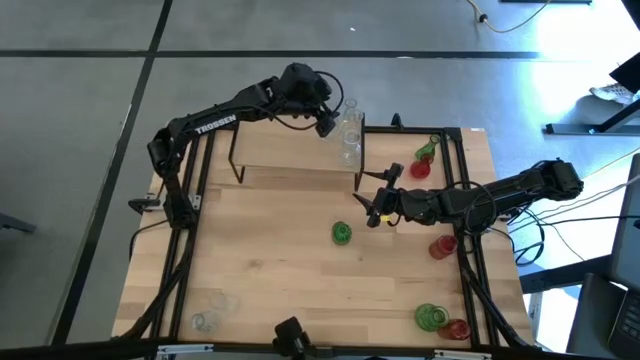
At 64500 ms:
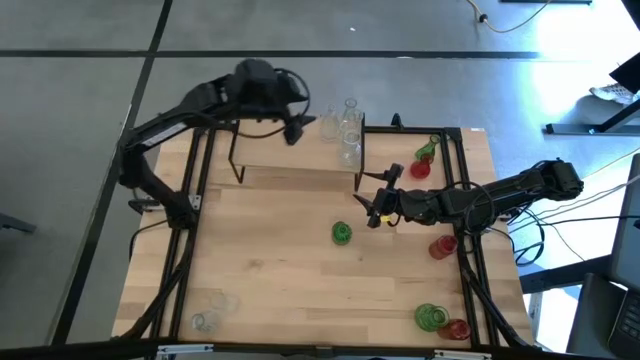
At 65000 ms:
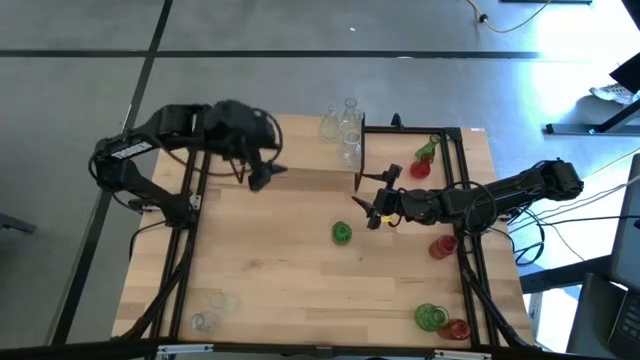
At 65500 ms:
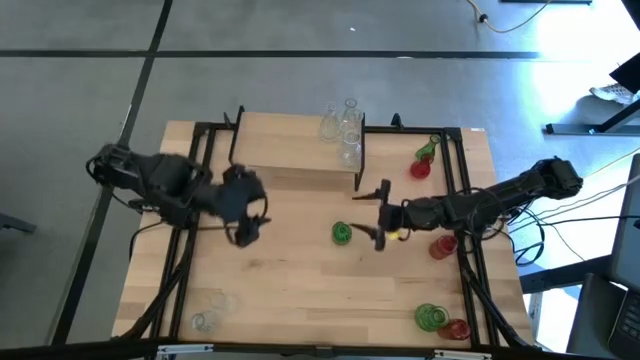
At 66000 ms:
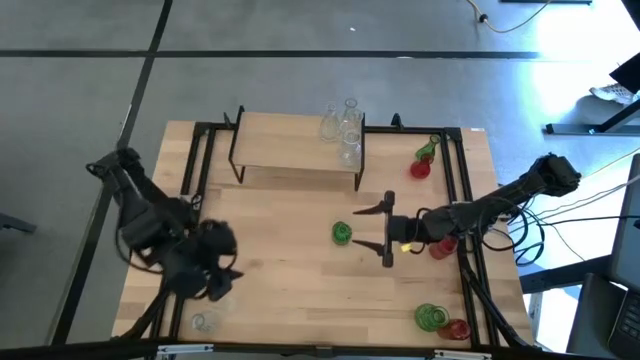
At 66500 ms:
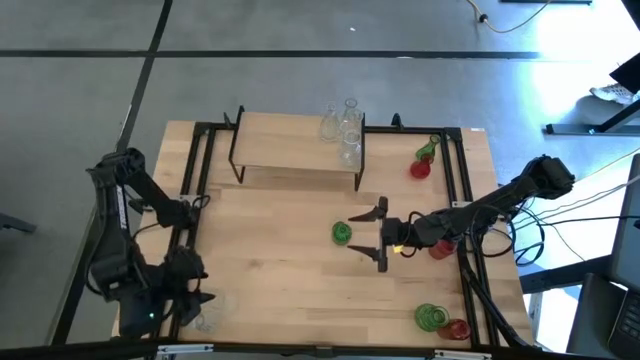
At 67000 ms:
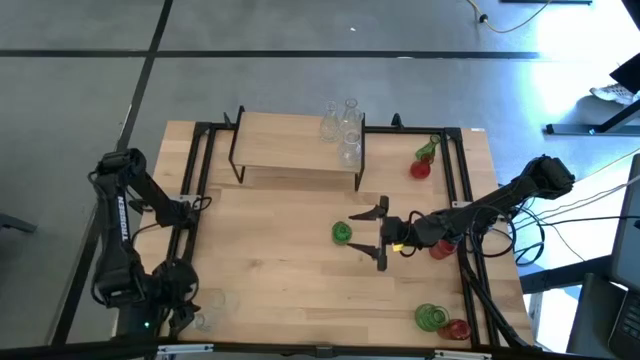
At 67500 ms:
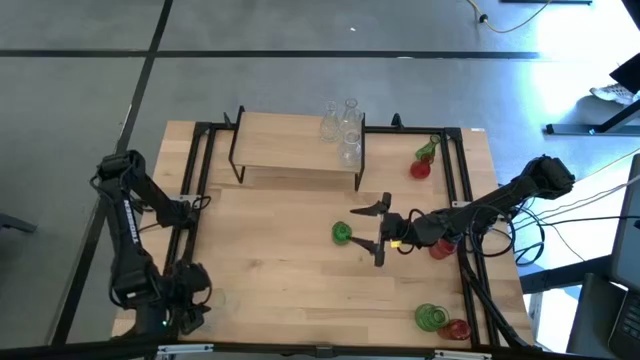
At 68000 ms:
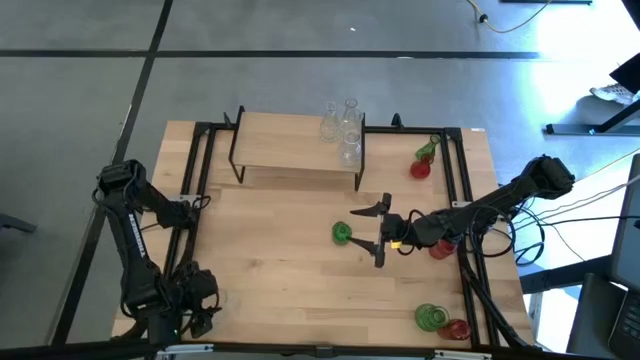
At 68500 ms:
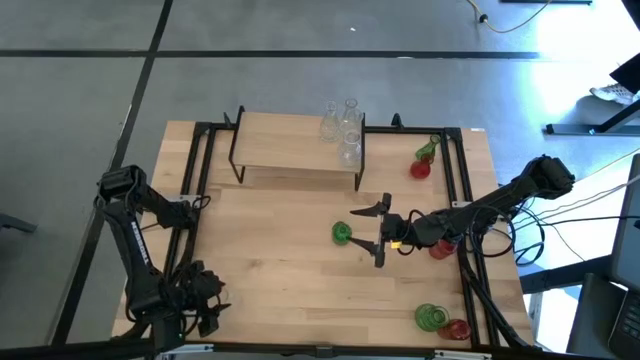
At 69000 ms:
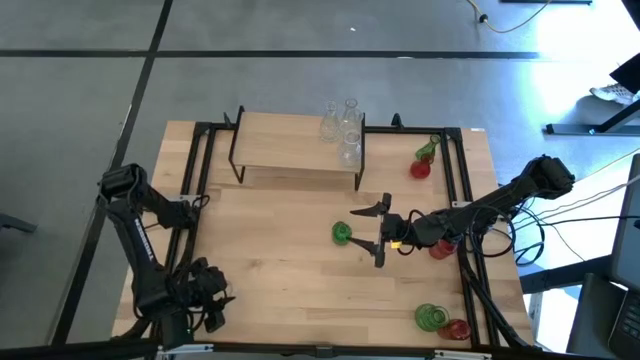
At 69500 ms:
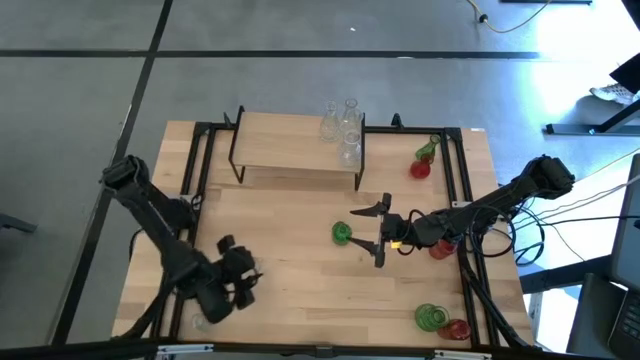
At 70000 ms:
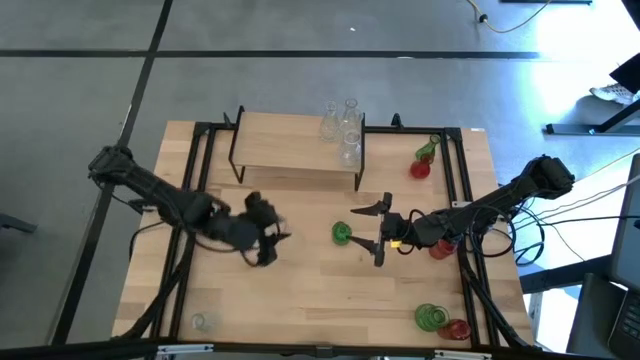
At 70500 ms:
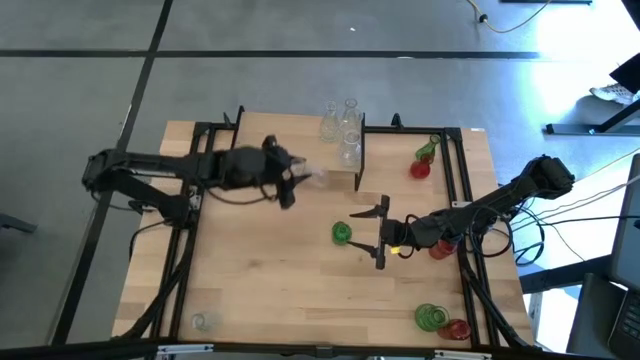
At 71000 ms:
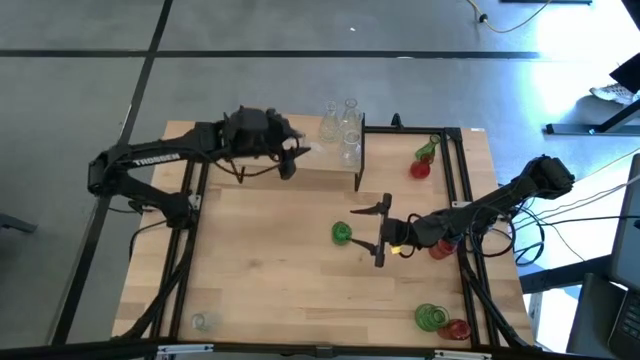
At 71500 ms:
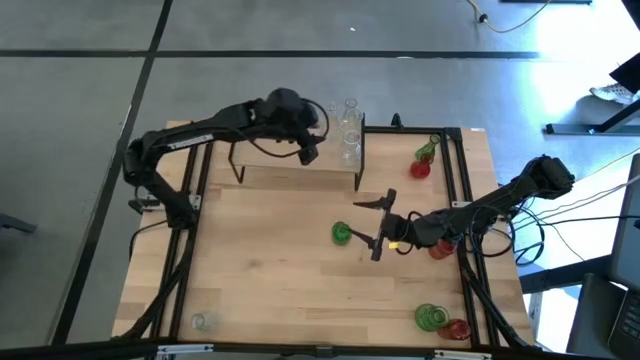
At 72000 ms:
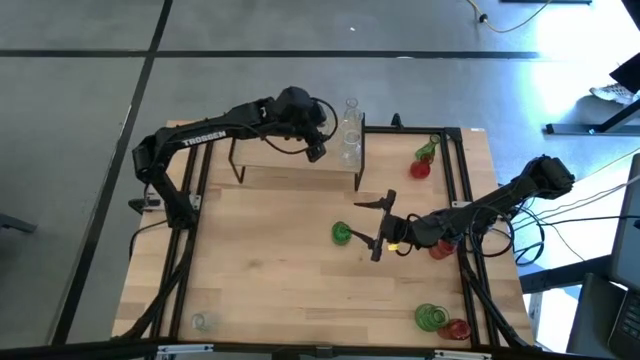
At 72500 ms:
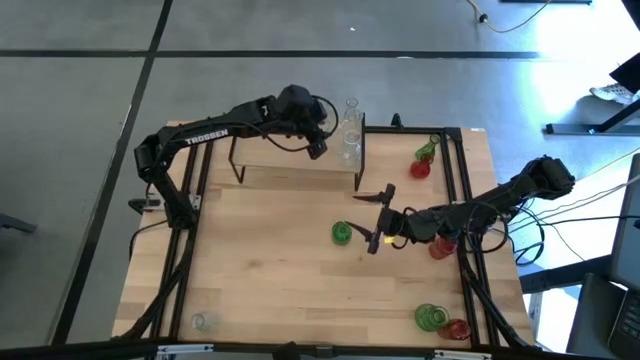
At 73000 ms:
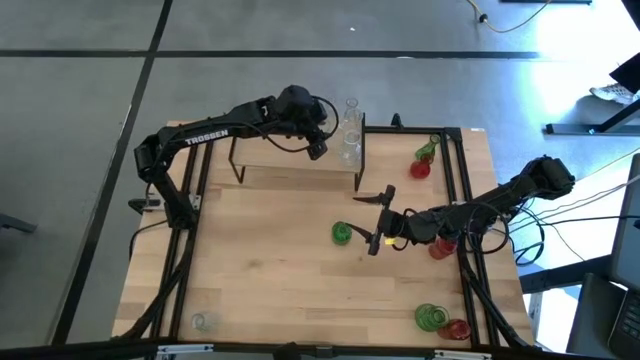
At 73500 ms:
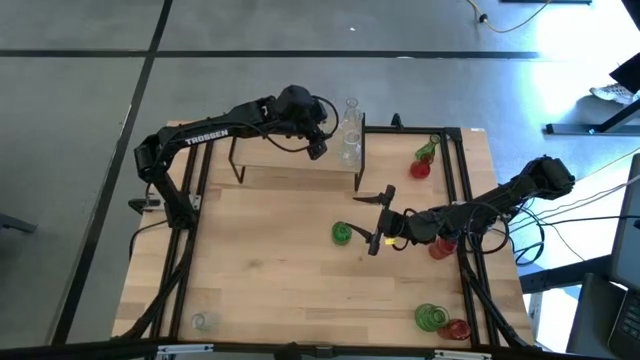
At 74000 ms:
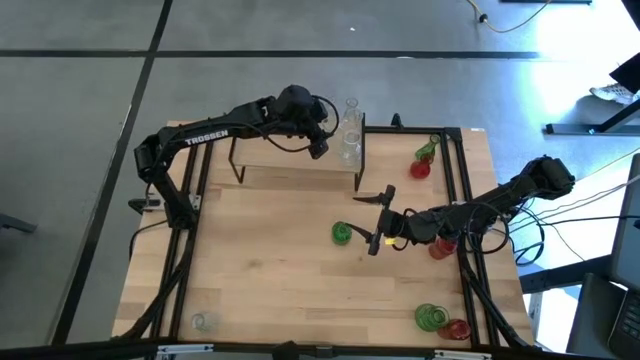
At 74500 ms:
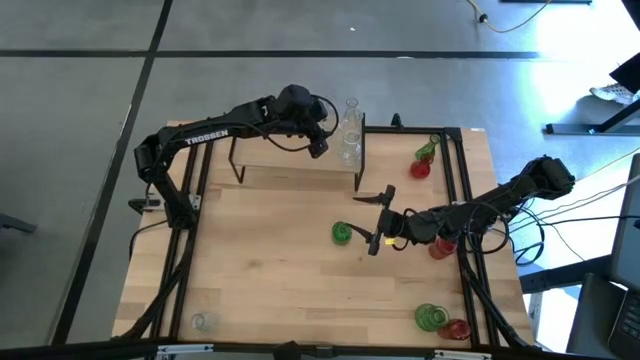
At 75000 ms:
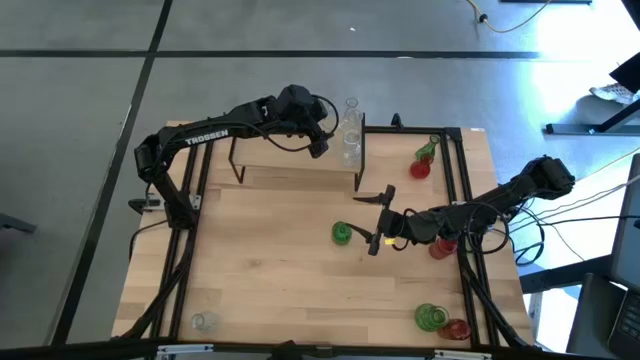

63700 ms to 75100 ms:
Task: sort vases onto shelf
Put the transparent vase aligned with the other transparent vase on the shelf

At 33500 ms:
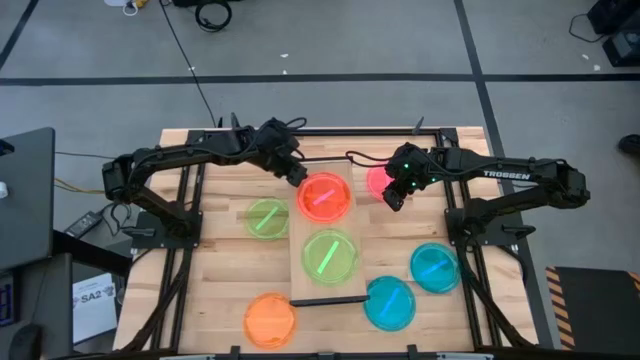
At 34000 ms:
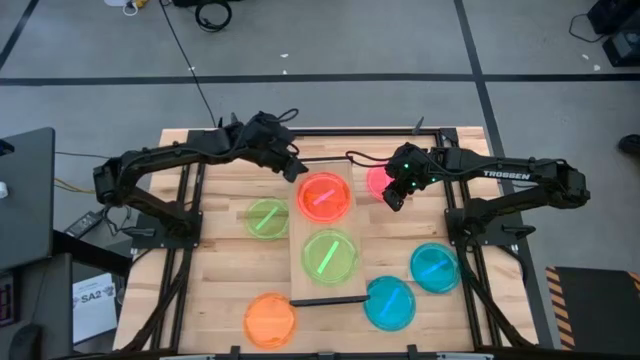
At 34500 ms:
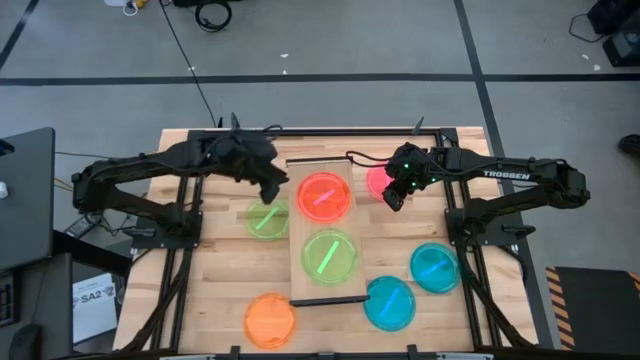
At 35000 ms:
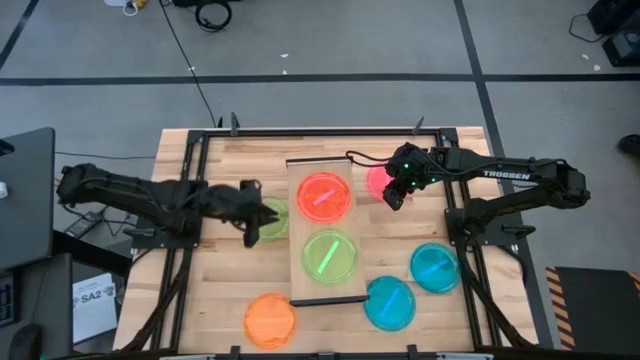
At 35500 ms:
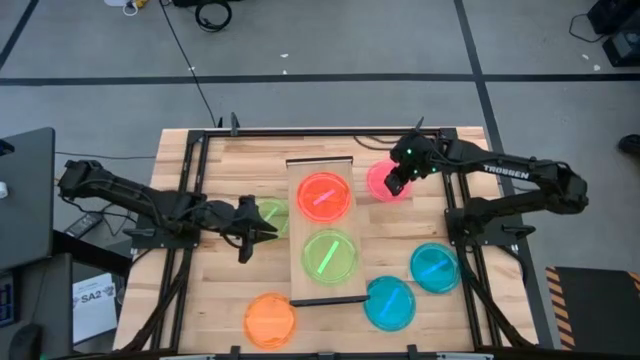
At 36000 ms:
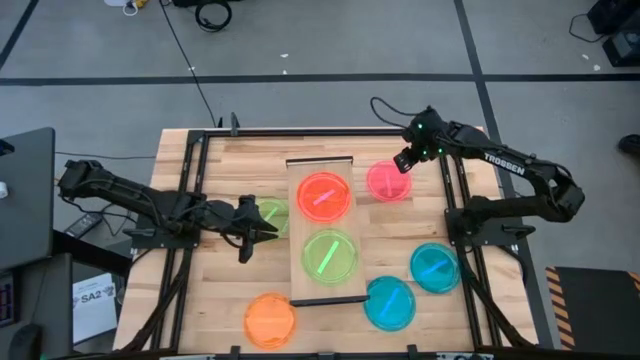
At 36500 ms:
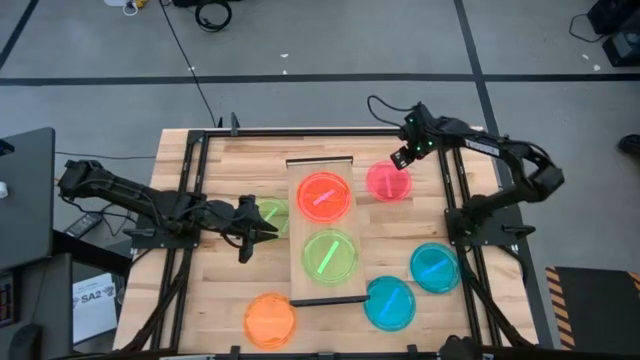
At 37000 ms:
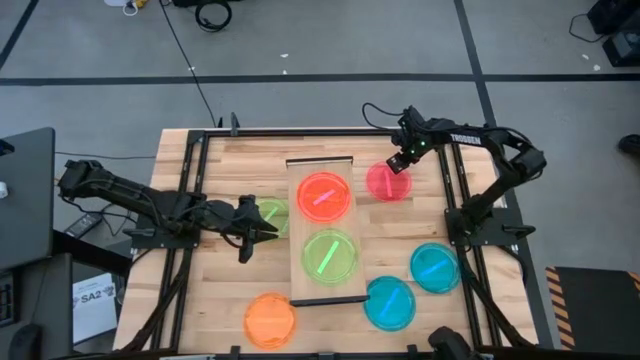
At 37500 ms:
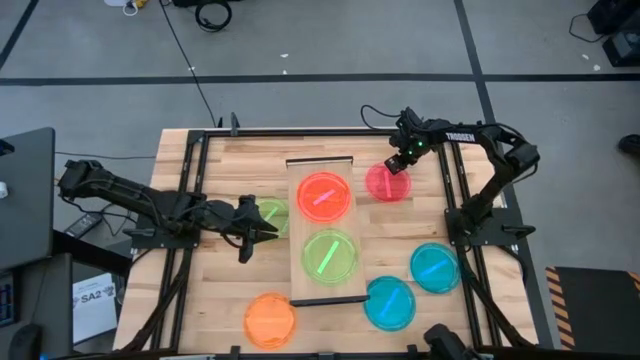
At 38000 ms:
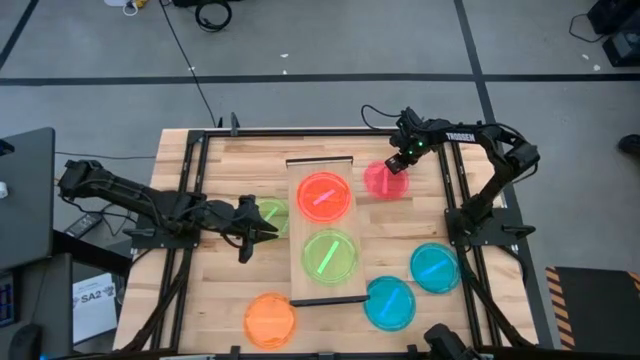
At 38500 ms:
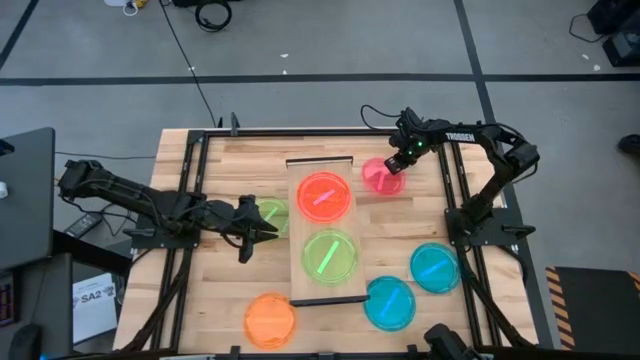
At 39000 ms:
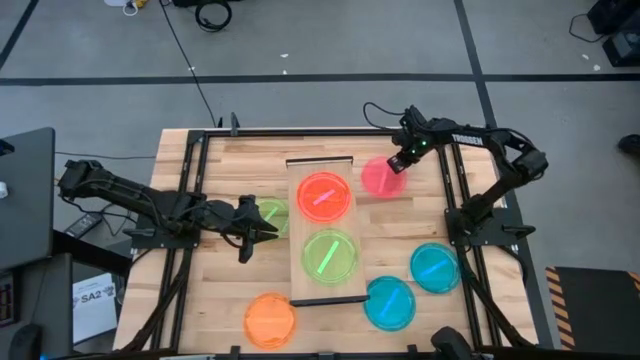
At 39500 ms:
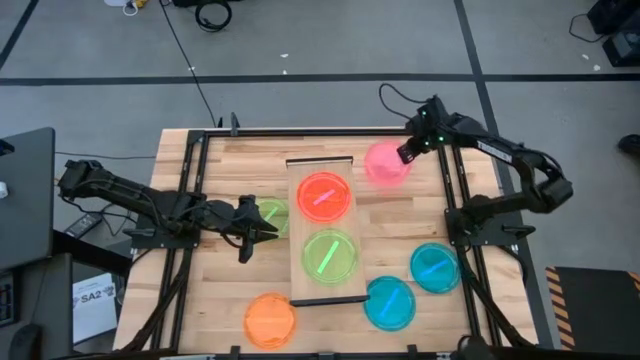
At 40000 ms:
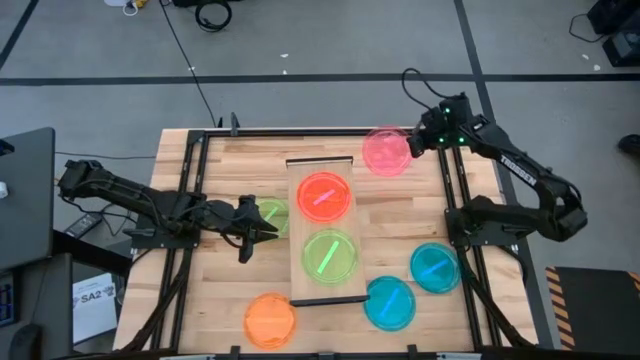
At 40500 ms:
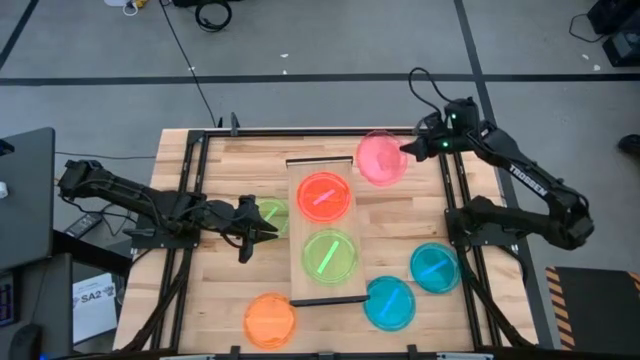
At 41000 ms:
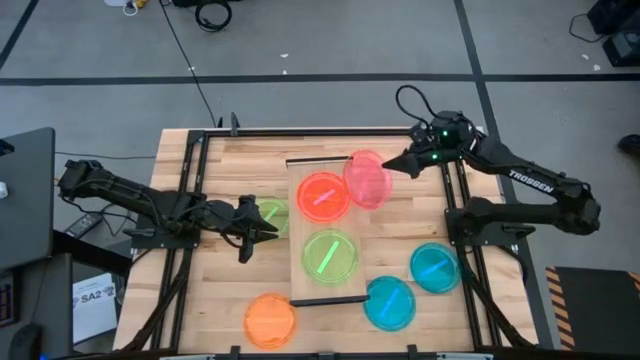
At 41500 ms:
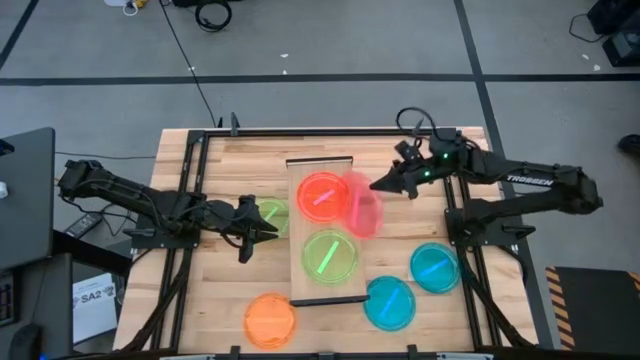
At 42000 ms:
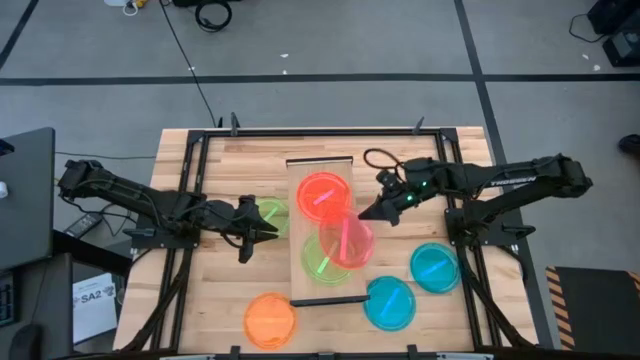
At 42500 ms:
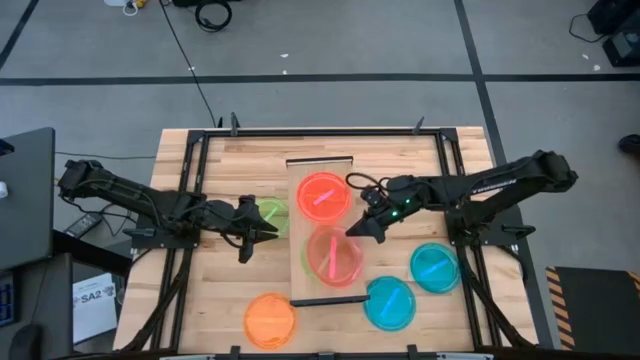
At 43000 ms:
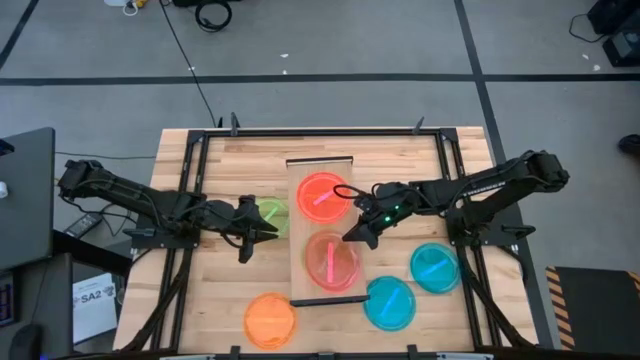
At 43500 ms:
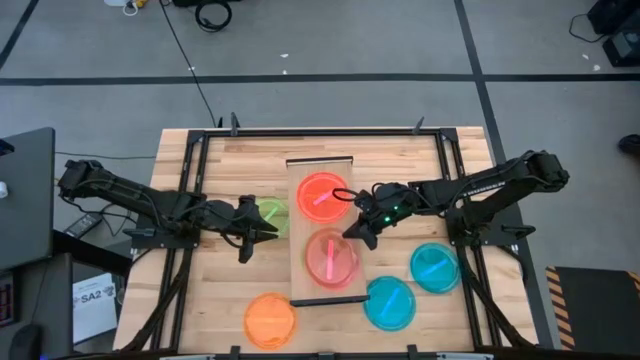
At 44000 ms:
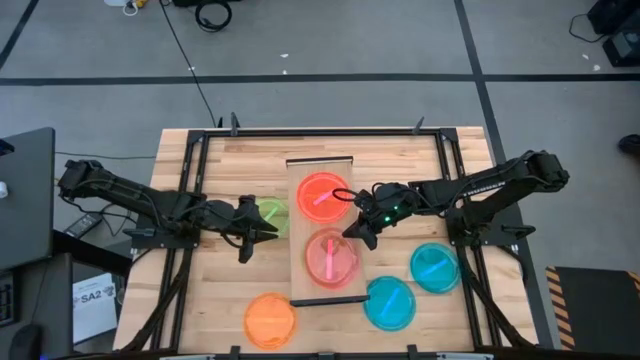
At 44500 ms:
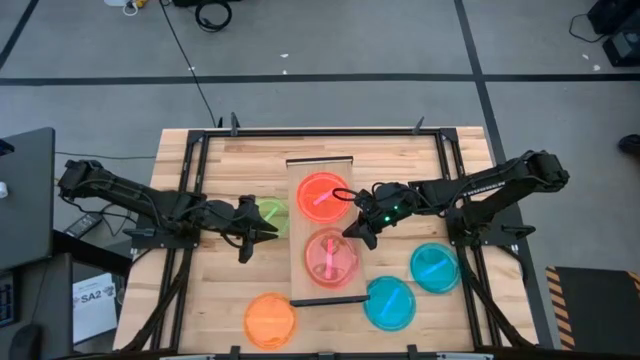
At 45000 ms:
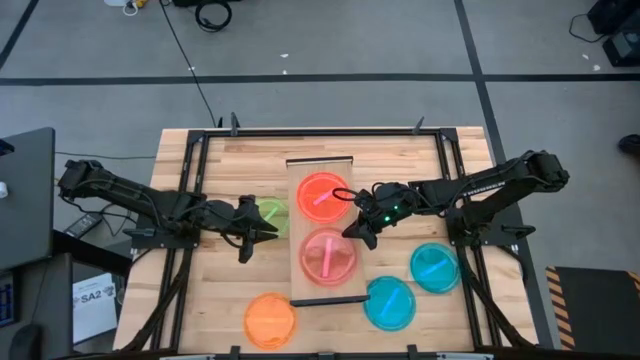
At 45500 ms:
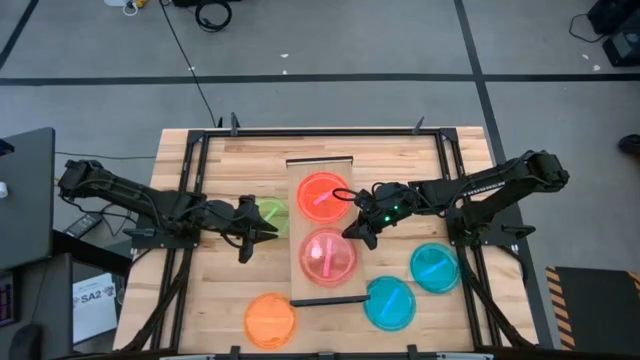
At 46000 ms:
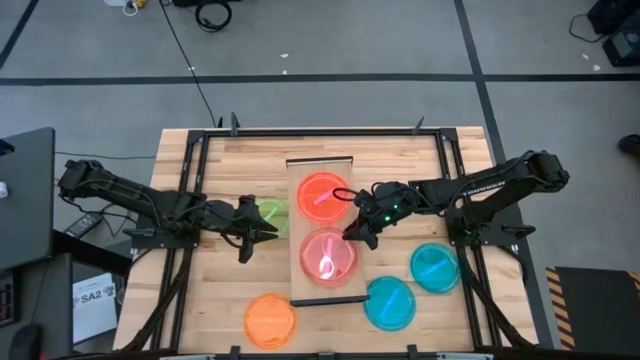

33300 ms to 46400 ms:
Task: Place and stack plates onto a shelf
Stack the pink plate on top of the green plate on the shelf
